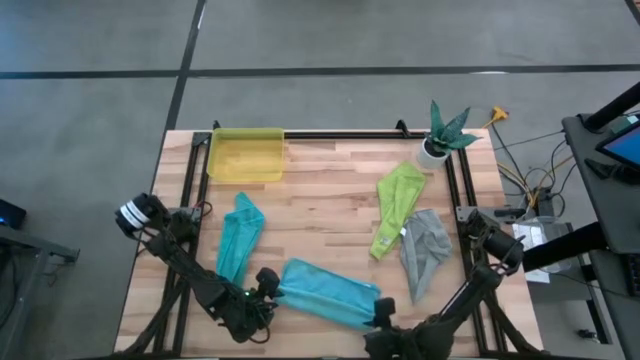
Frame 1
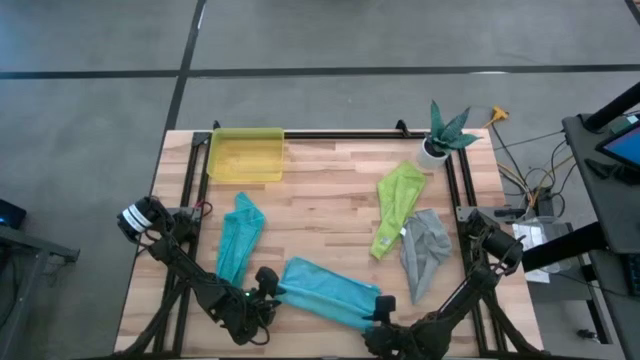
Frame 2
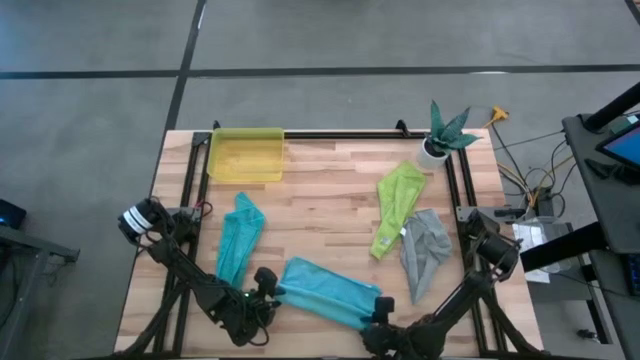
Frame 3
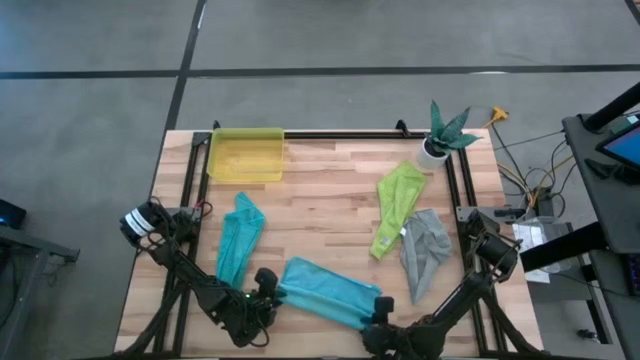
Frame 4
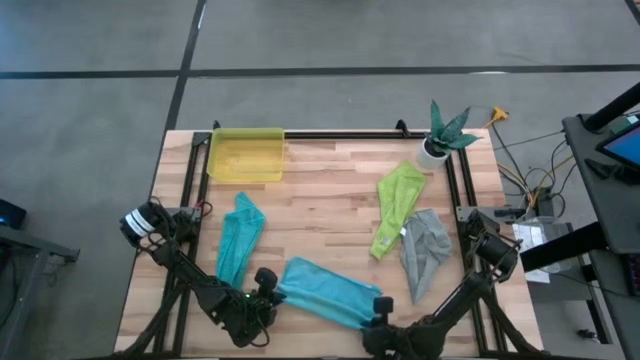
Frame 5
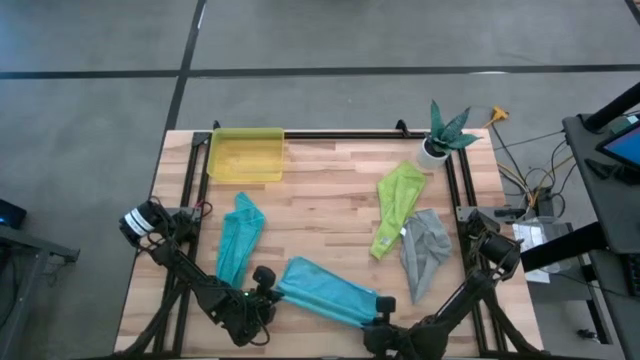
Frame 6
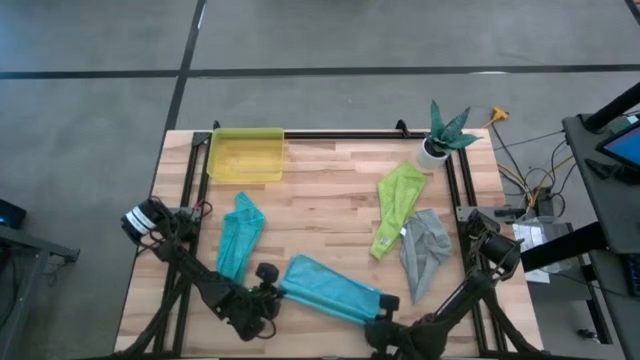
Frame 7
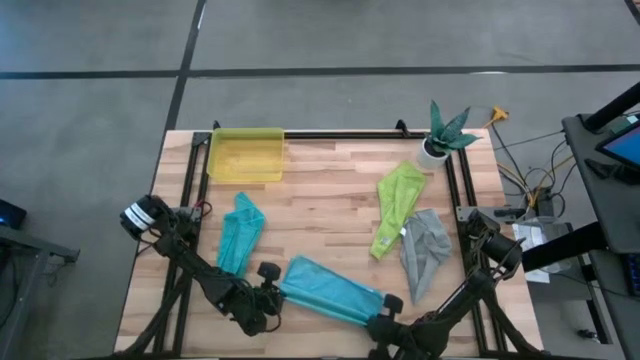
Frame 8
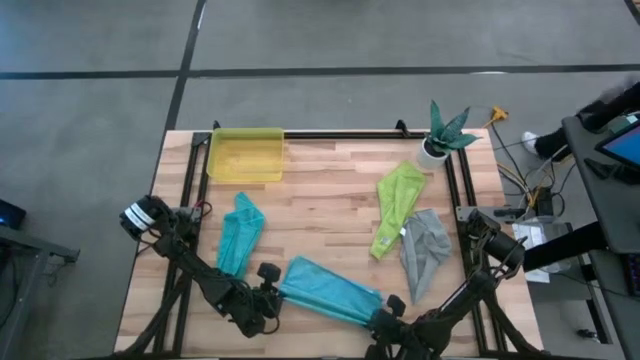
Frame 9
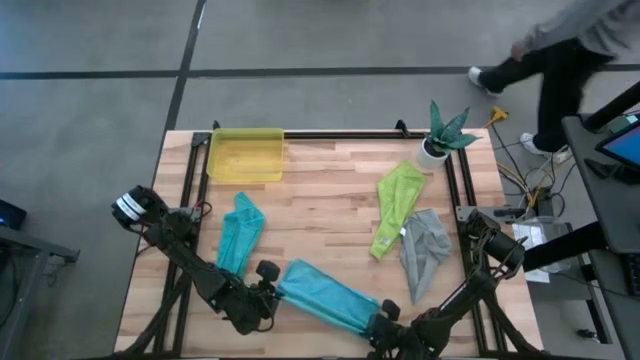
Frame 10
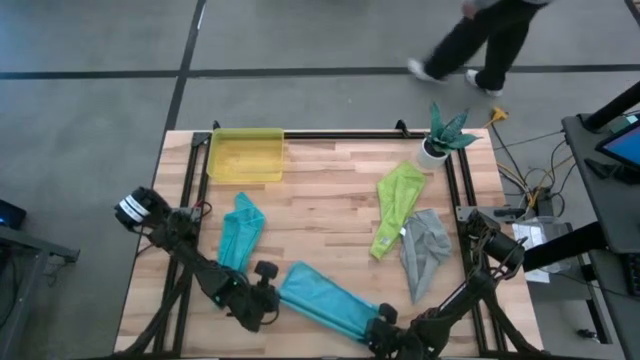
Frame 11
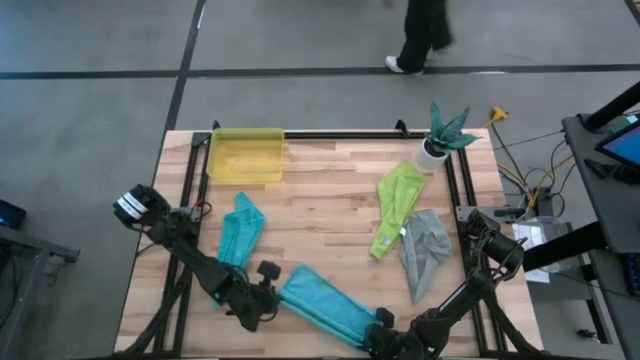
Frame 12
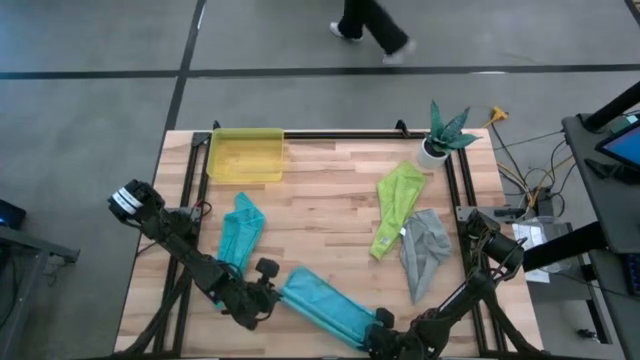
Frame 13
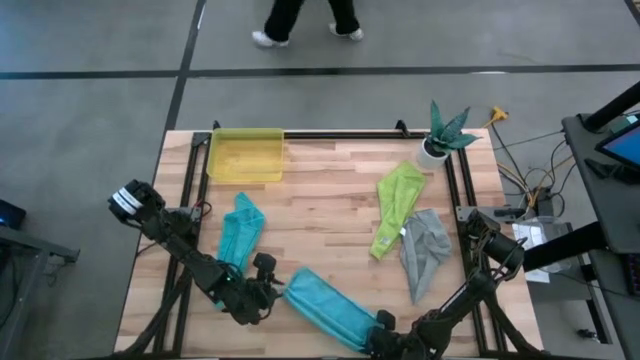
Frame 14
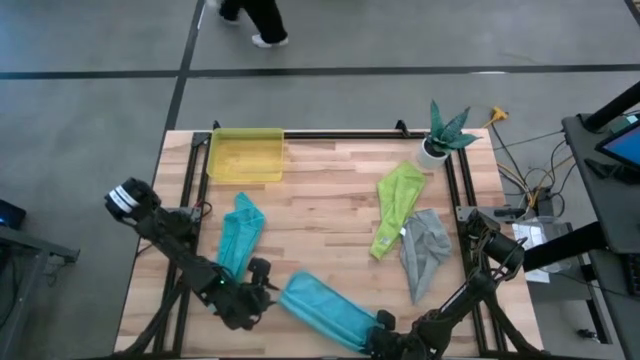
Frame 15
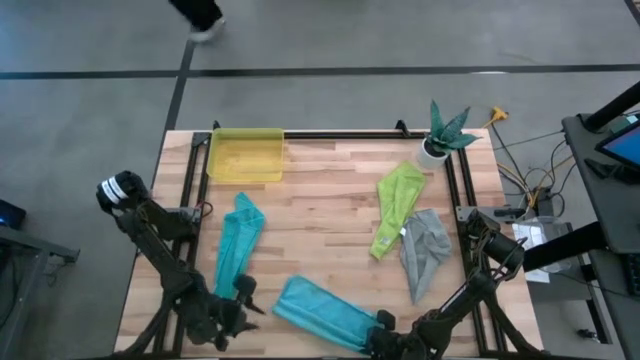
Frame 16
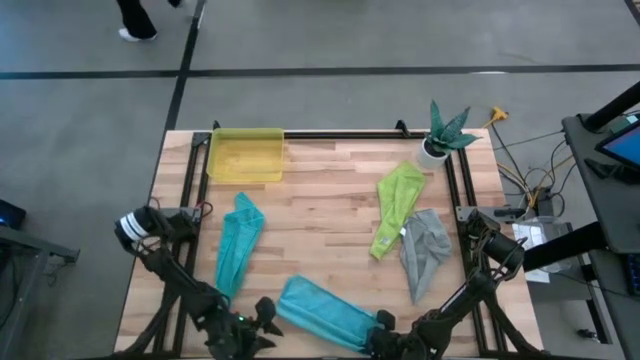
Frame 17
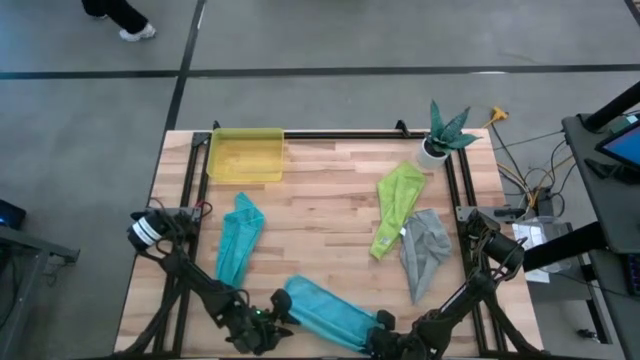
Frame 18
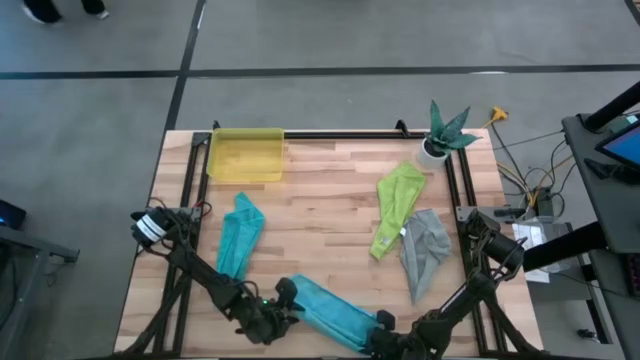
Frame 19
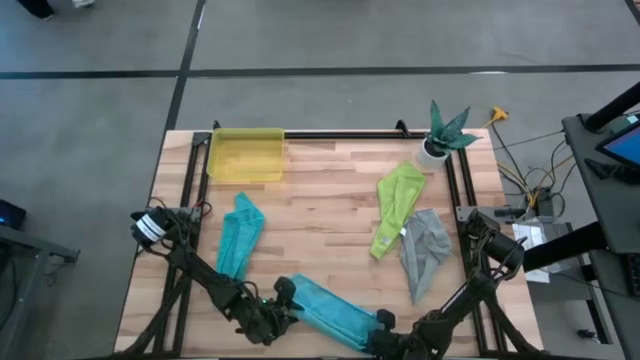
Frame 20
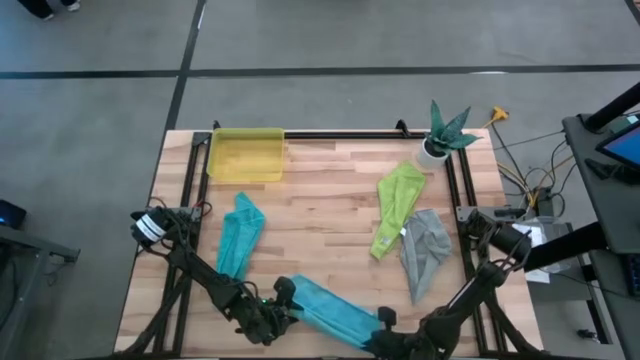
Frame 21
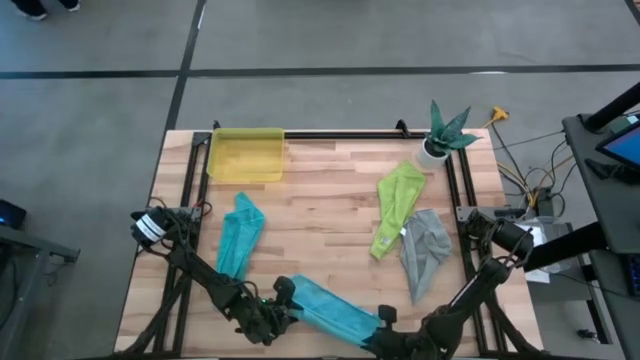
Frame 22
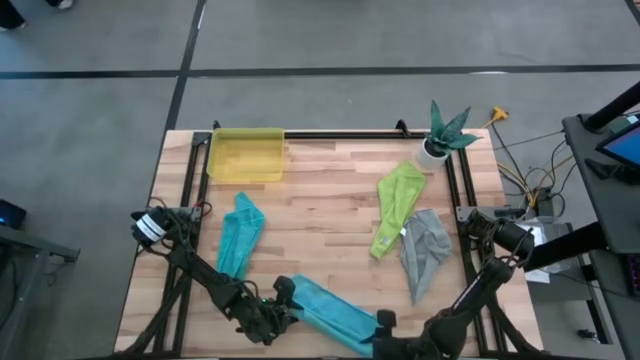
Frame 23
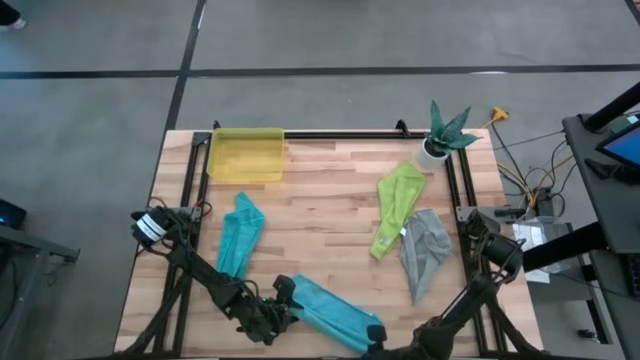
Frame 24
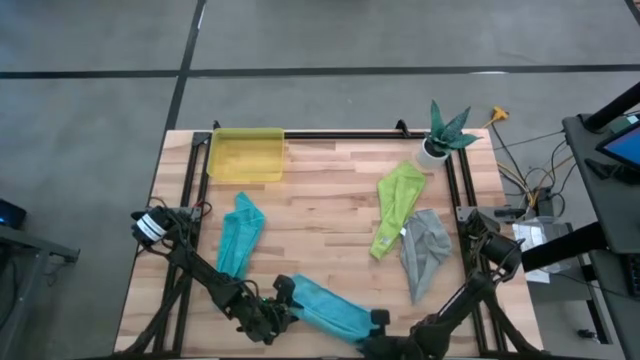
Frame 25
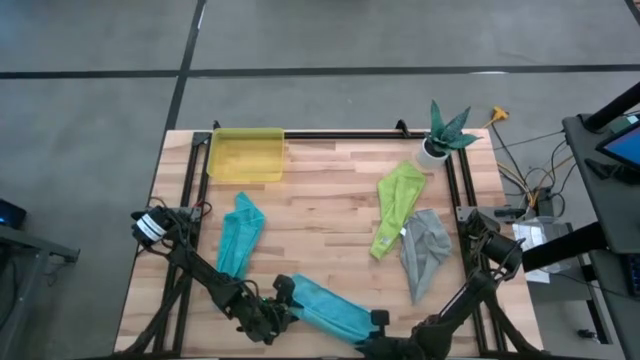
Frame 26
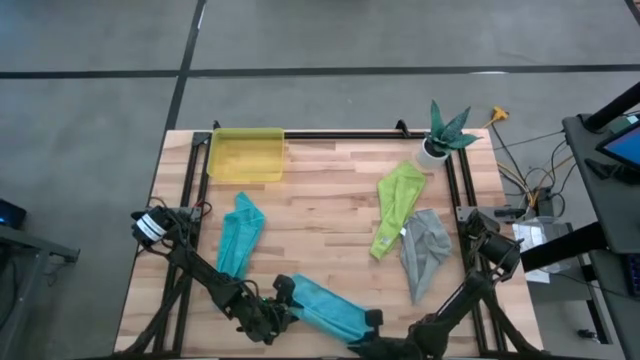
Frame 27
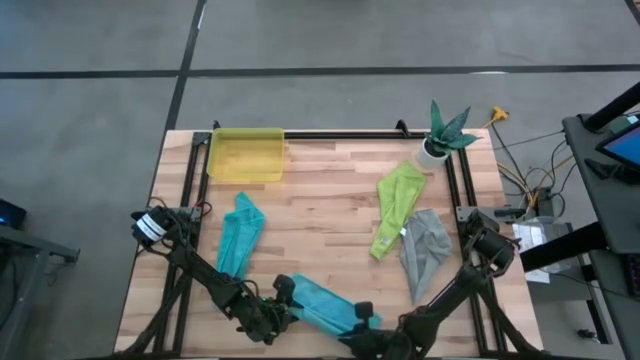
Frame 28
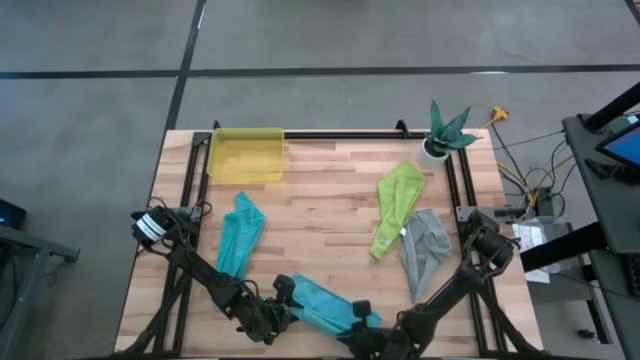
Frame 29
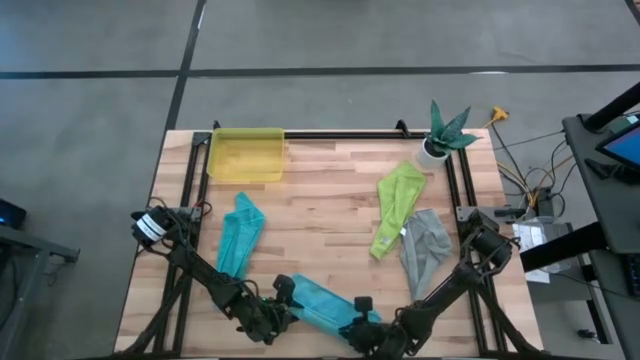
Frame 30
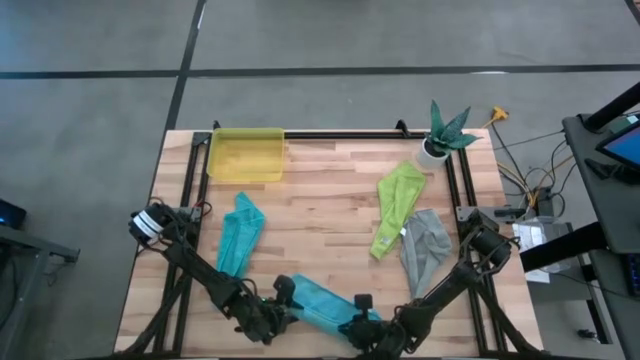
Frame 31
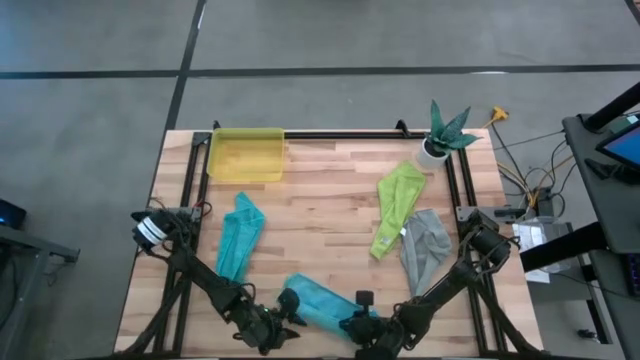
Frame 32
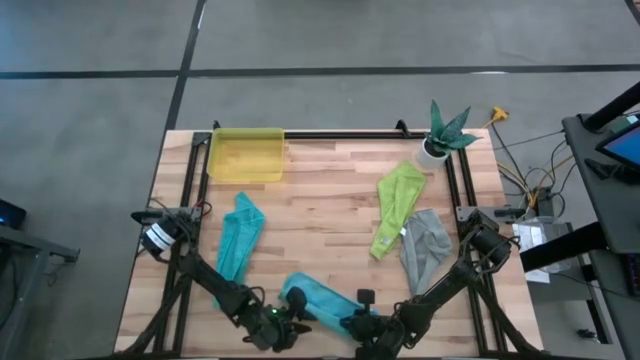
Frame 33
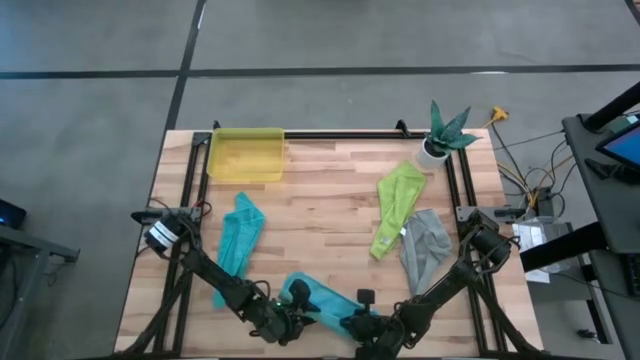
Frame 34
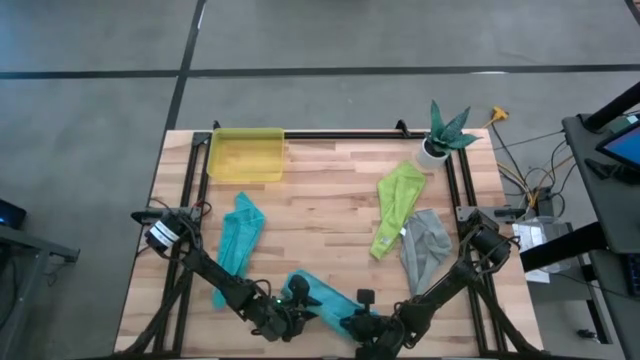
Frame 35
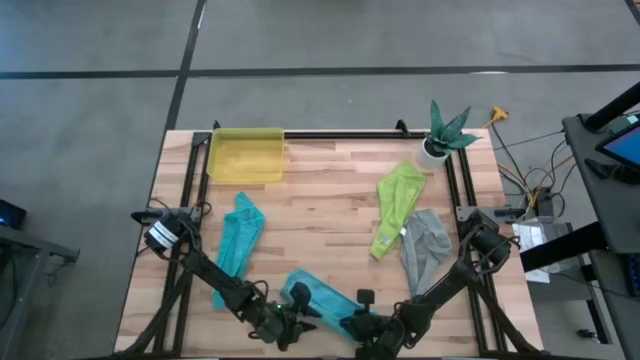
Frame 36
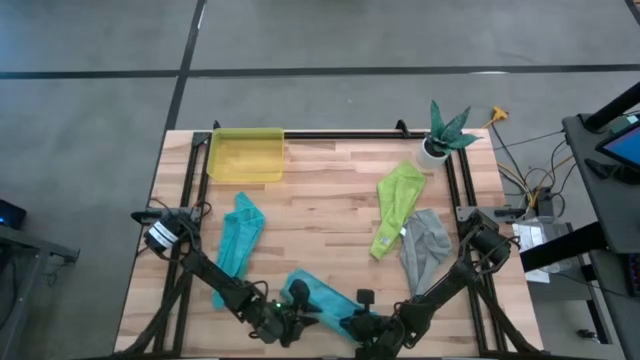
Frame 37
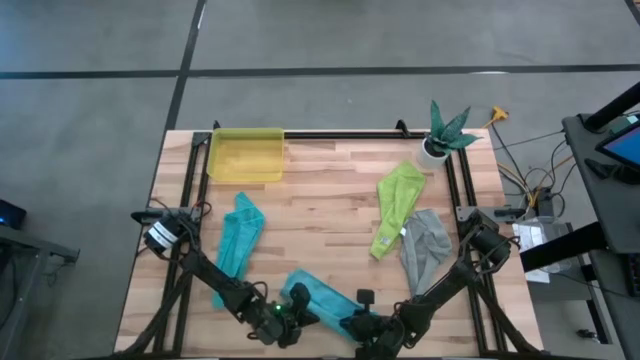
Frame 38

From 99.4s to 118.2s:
Task: Roll microfiber towels into tight, uniform cylinder then place into a basket
Roll the right light blue towel
